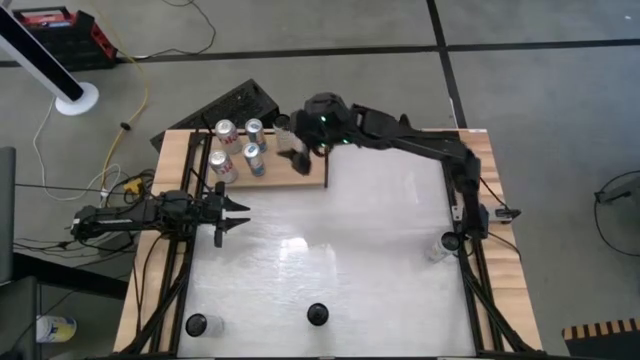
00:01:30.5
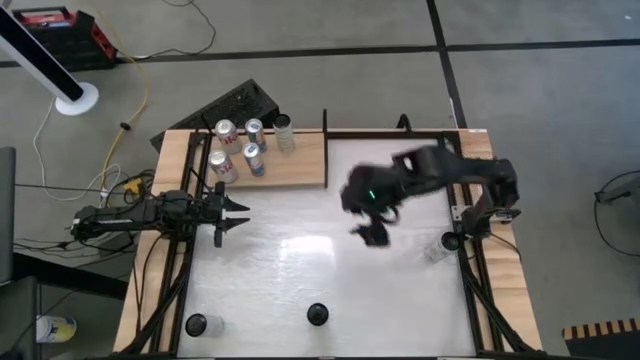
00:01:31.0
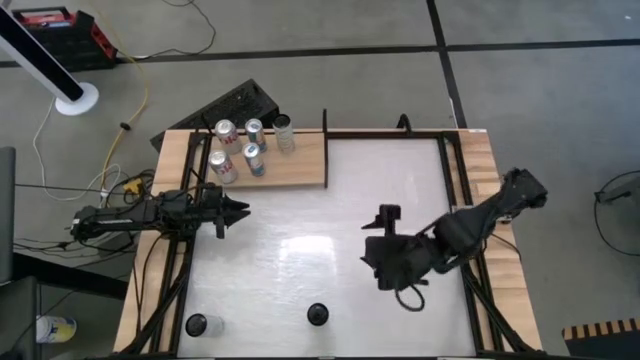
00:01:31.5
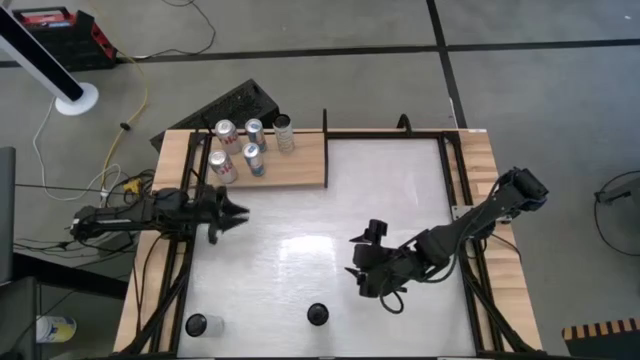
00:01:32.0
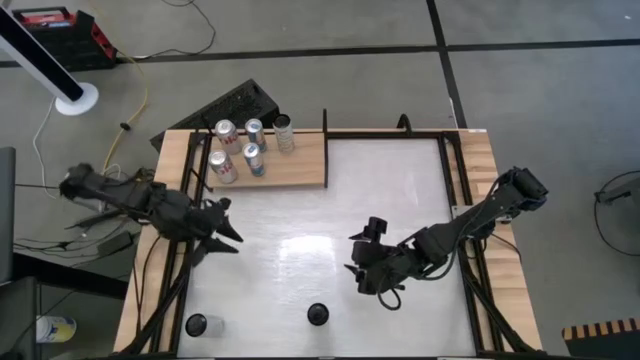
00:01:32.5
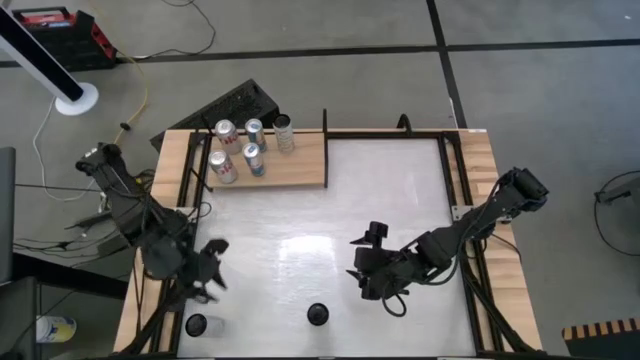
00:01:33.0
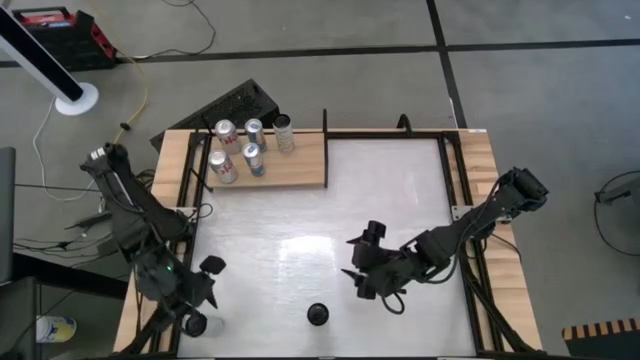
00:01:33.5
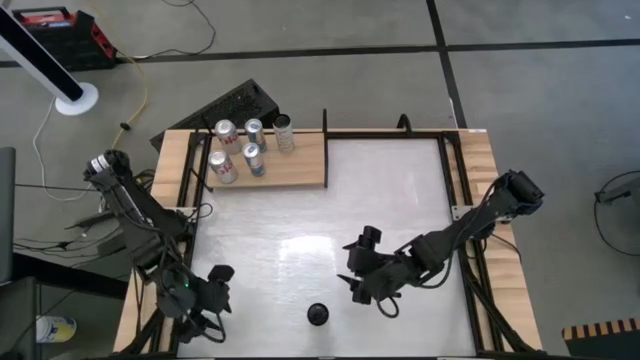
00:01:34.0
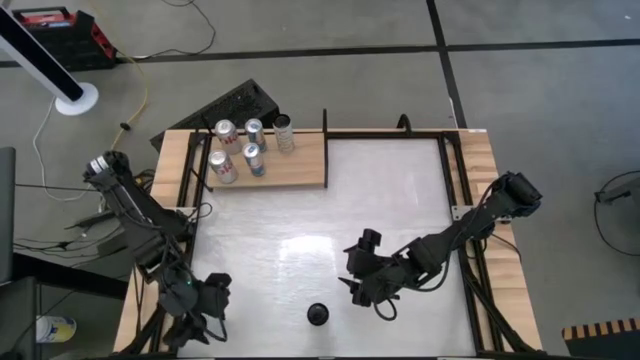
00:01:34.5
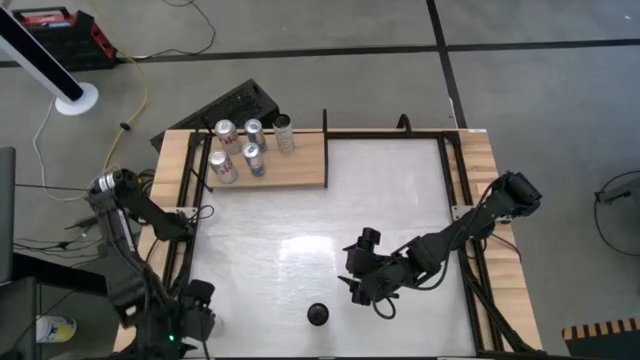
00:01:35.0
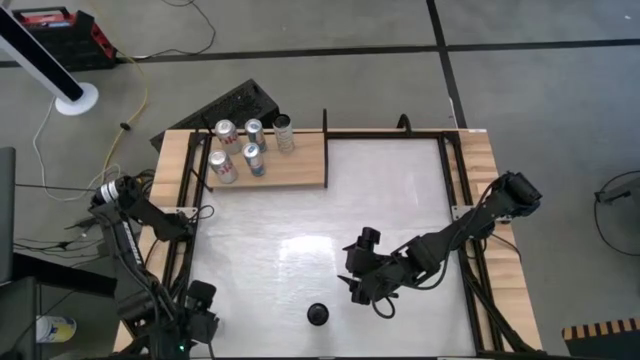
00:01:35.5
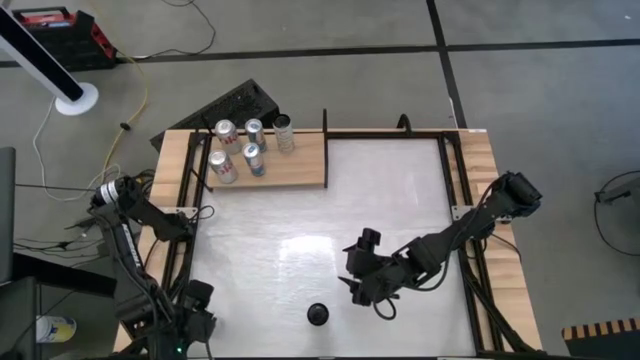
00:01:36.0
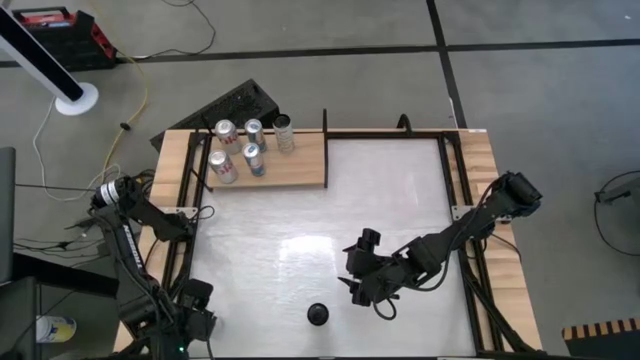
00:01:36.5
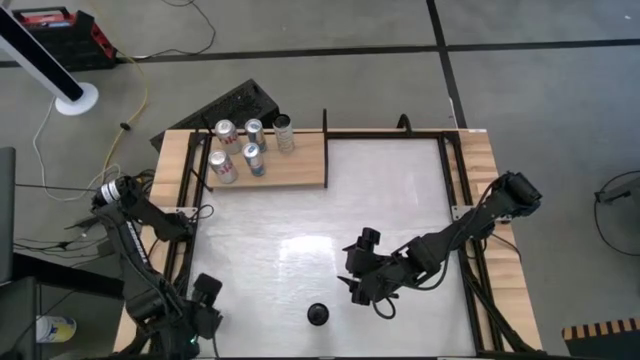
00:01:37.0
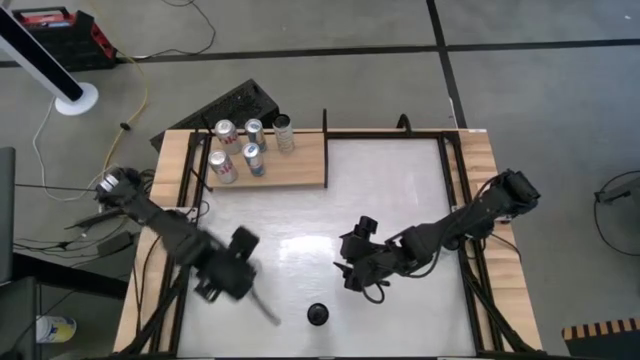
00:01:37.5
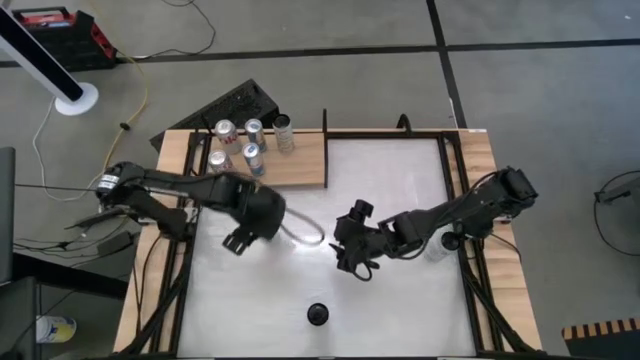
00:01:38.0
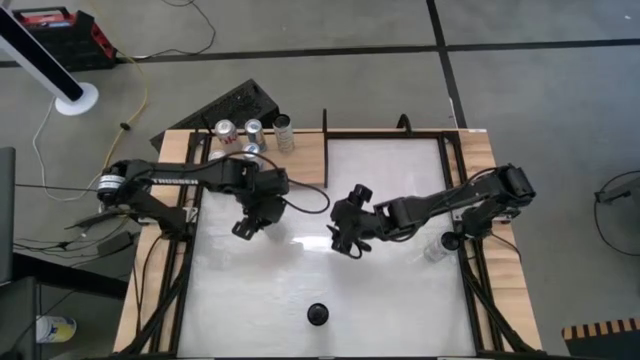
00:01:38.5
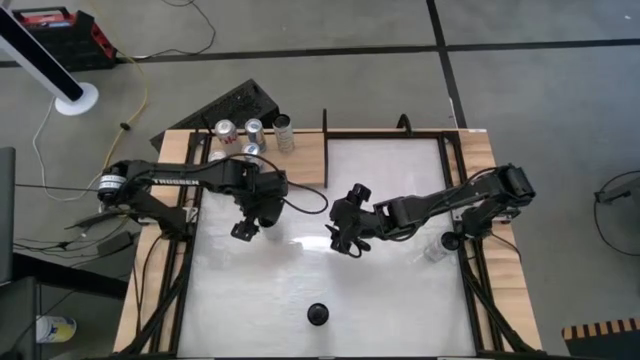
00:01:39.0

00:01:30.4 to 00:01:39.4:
Task: Place canned beverage on shelf
Move the white and yellow soda can to the center of the table

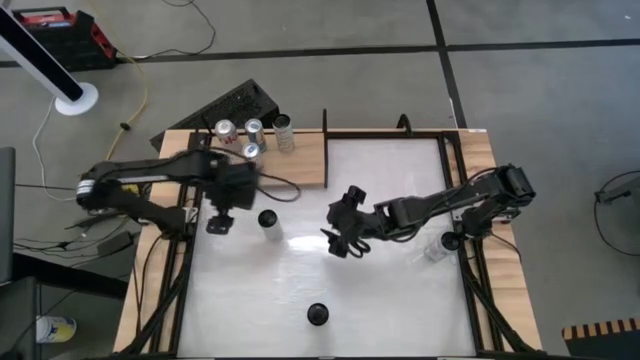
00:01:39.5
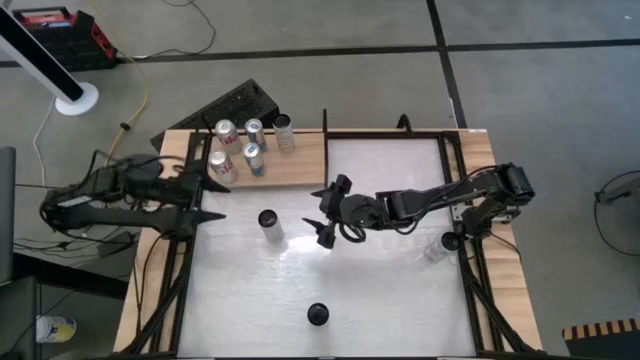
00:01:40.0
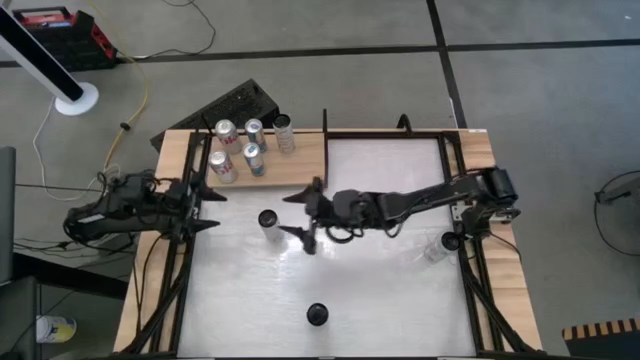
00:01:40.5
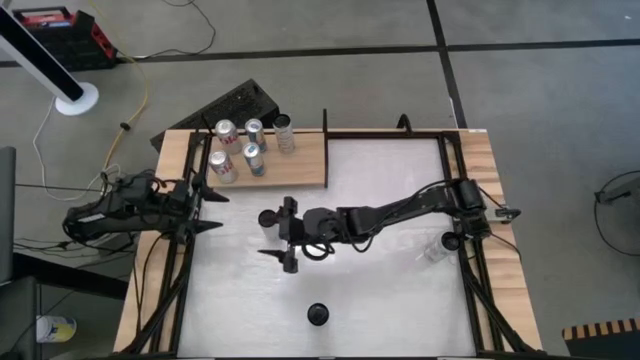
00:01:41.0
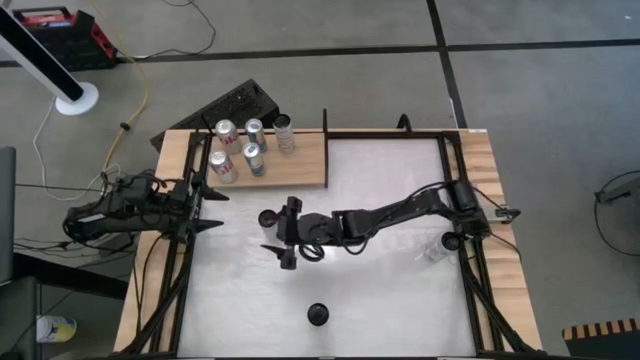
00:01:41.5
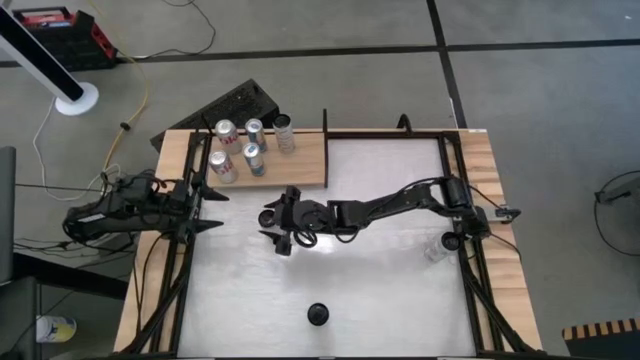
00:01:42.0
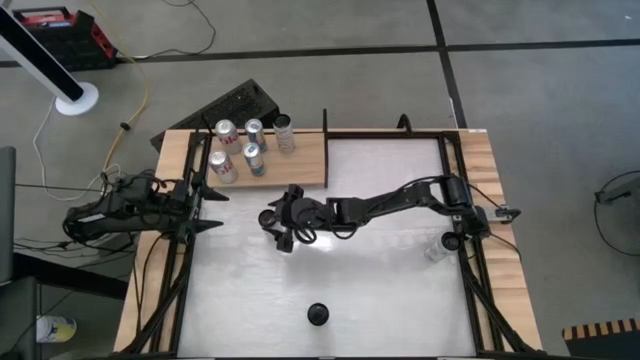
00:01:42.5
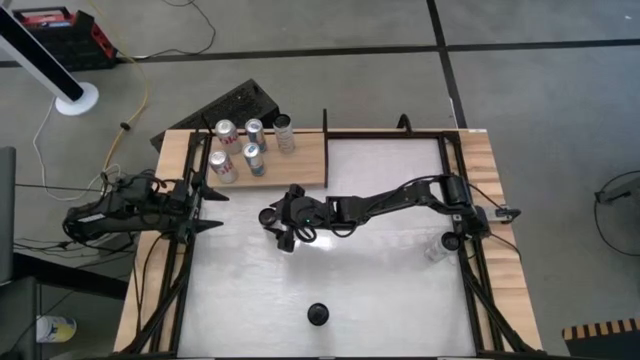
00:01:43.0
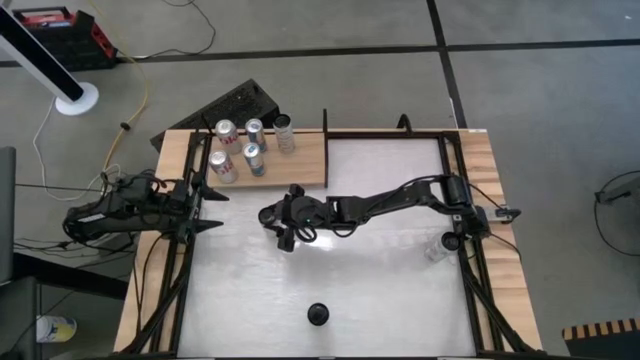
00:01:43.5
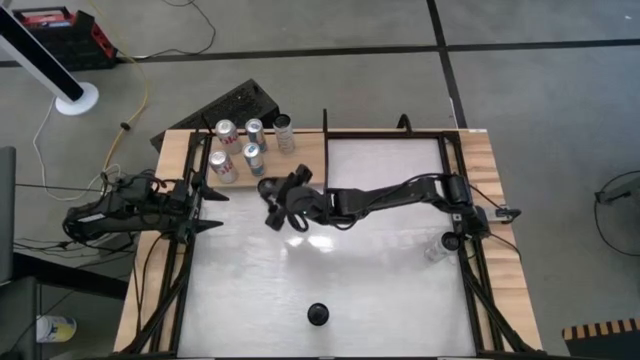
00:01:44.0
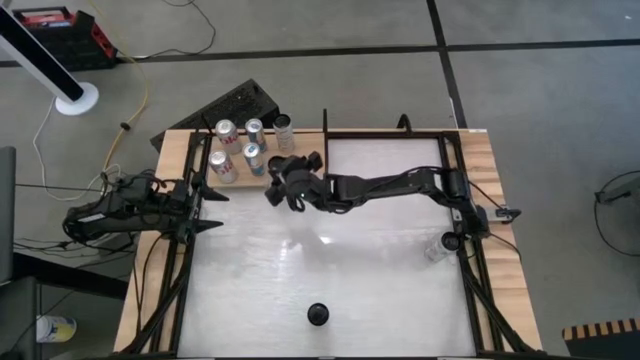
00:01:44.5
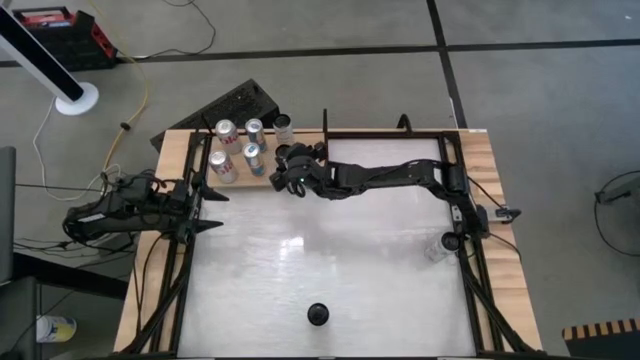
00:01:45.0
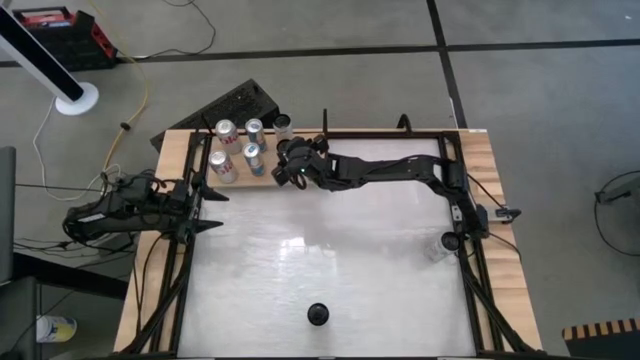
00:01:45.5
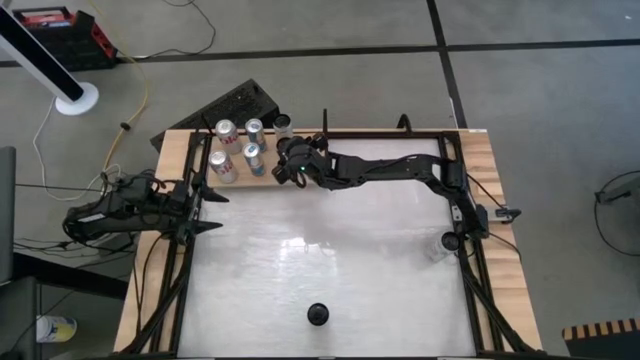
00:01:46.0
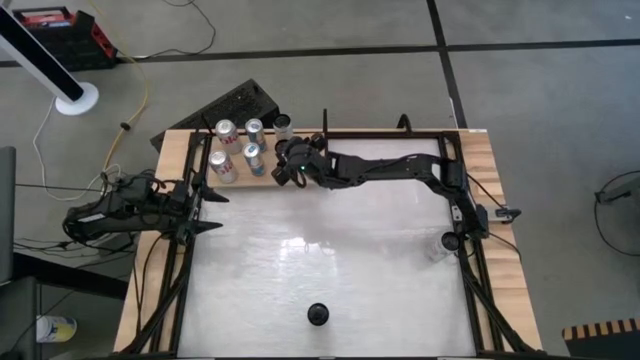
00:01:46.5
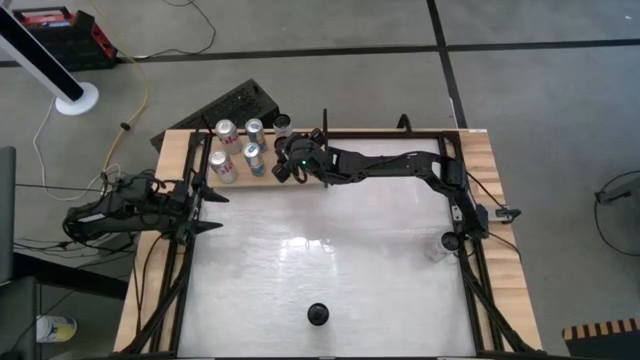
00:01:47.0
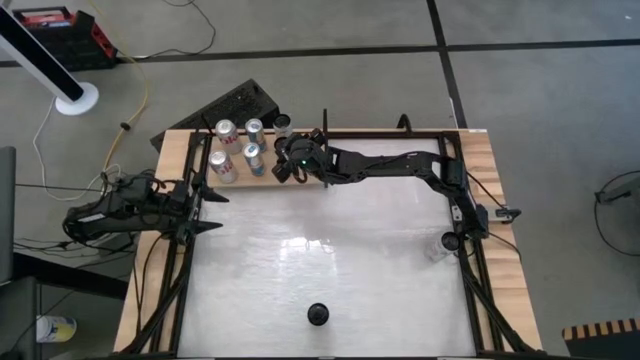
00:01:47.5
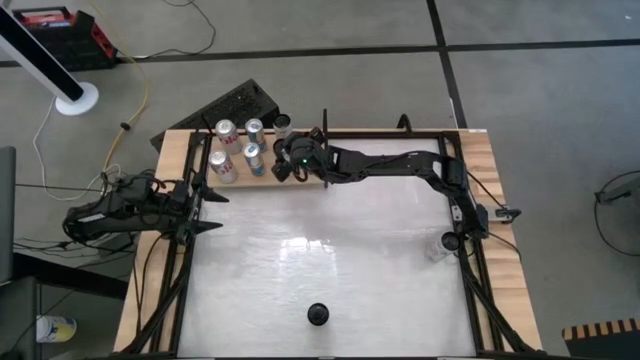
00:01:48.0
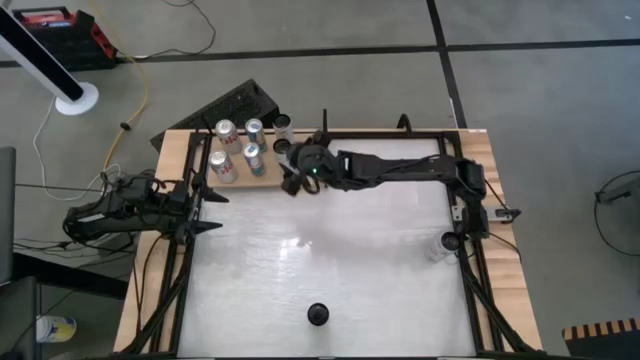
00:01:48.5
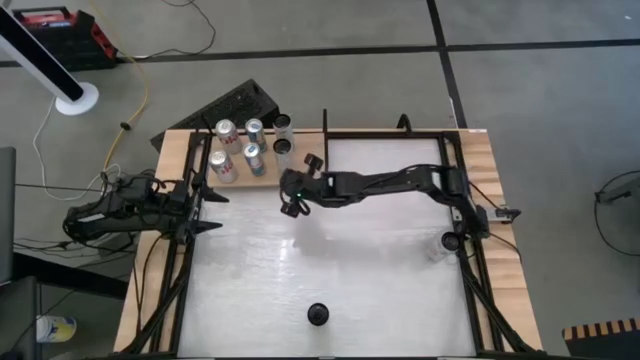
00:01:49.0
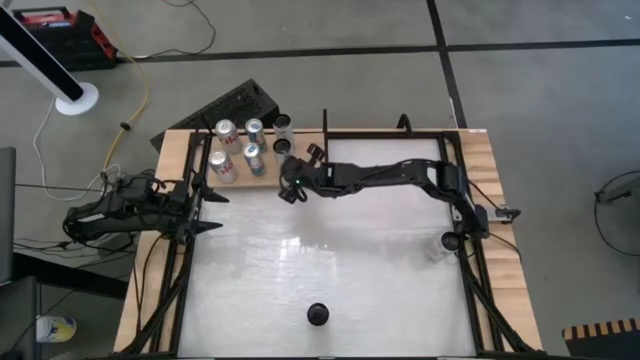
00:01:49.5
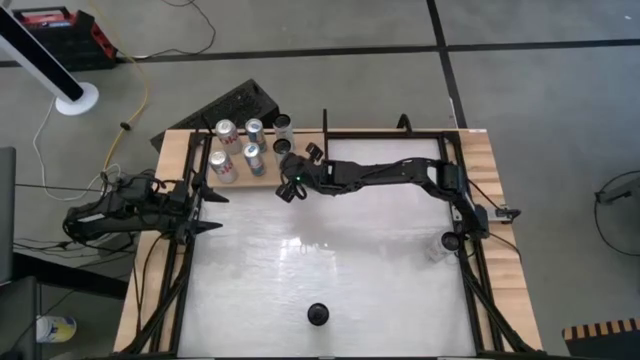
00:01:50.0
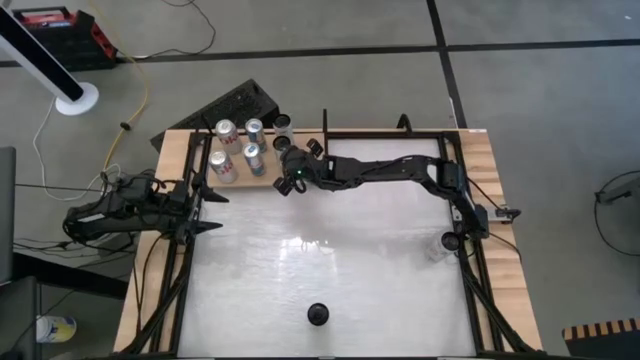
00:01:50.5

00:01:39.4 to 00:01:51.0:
Put the white and yellow soda can aligned with the other white and yellow soda can on the shelf

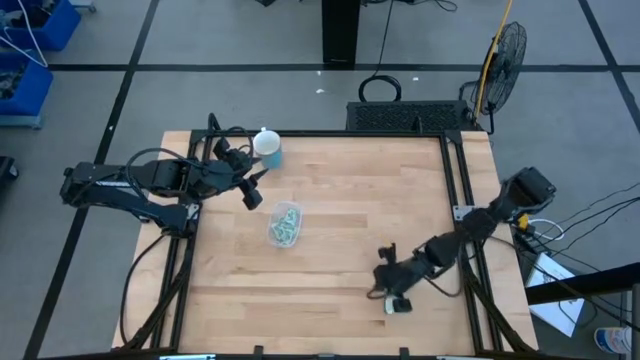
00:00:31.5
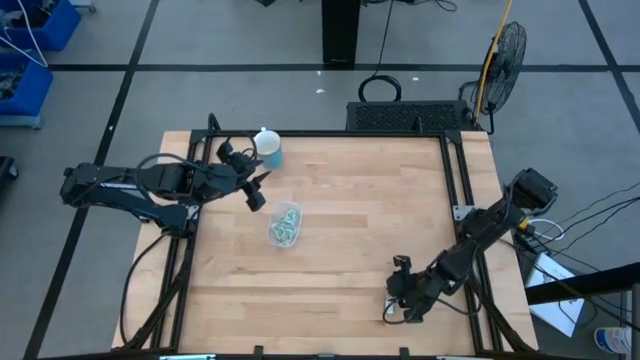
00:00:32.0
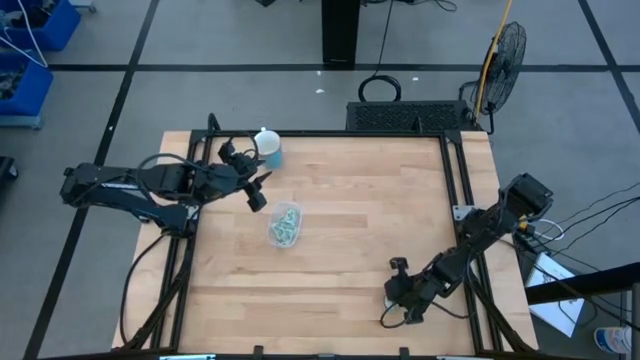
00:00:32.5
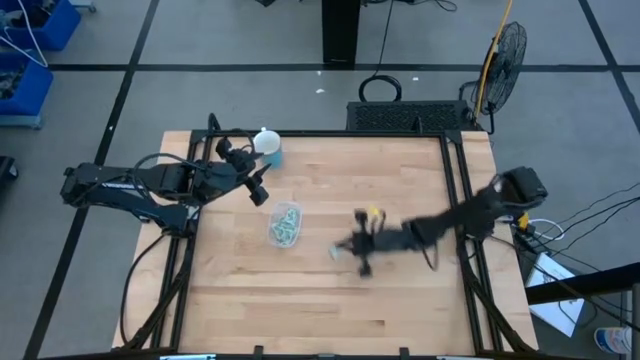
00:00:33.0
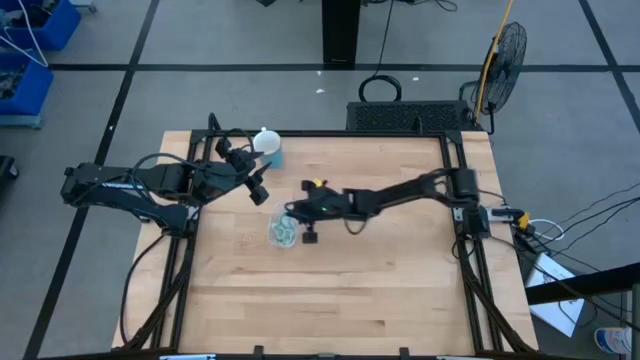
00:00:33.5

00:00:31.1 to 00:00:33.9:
Task: Pick and place Stevia / Truvia into bins
Put the green truvia packet into the transparent container
